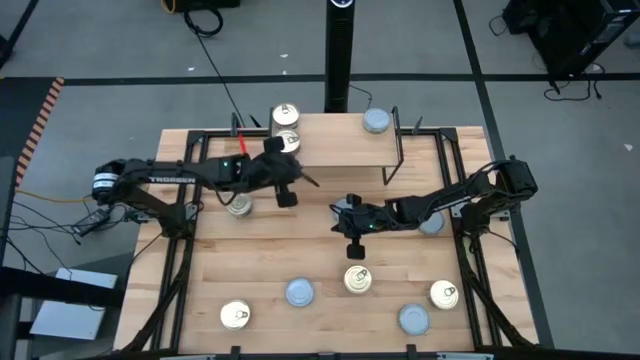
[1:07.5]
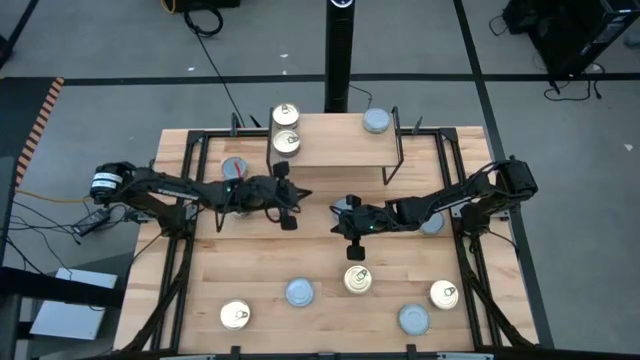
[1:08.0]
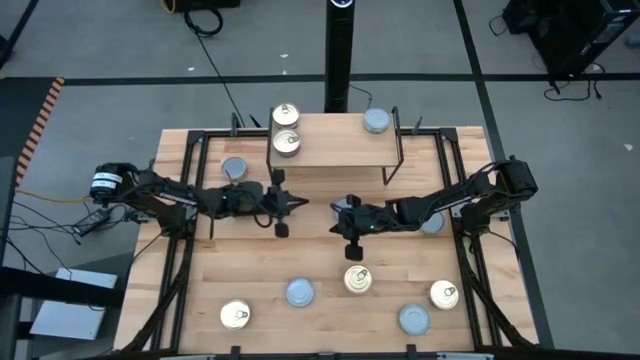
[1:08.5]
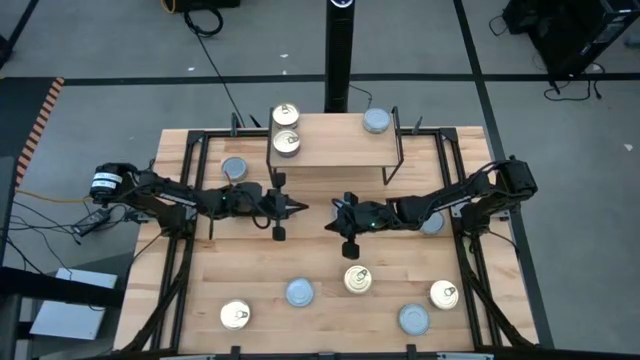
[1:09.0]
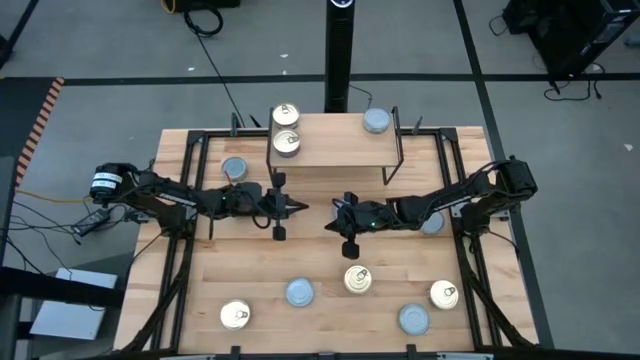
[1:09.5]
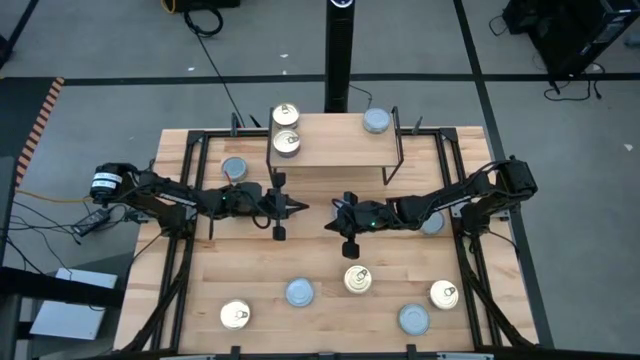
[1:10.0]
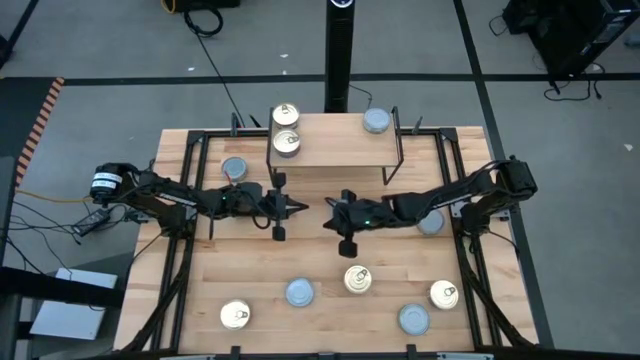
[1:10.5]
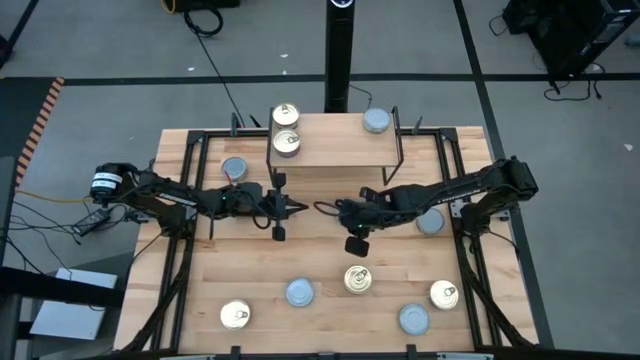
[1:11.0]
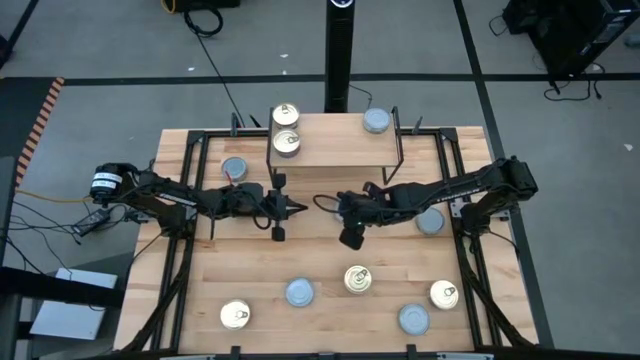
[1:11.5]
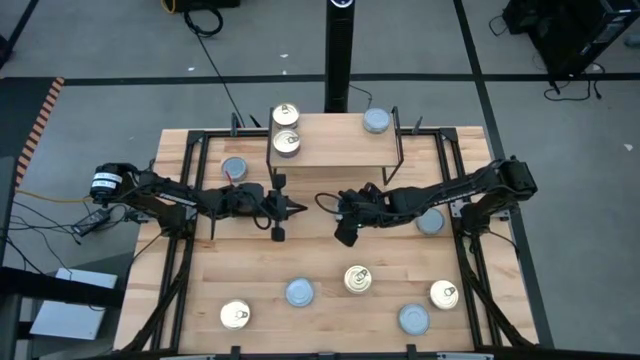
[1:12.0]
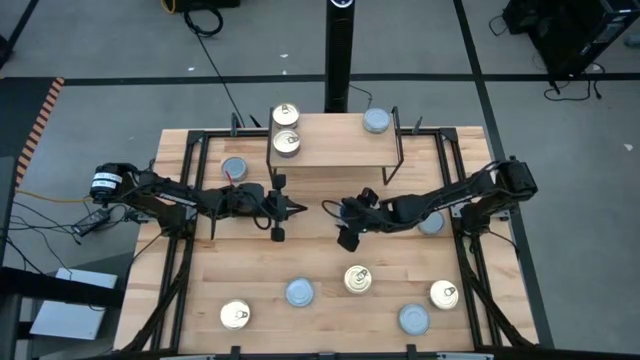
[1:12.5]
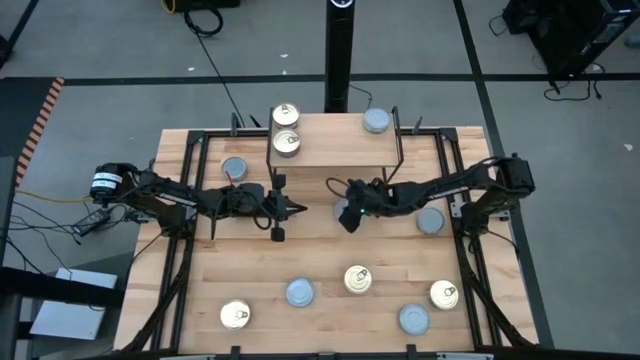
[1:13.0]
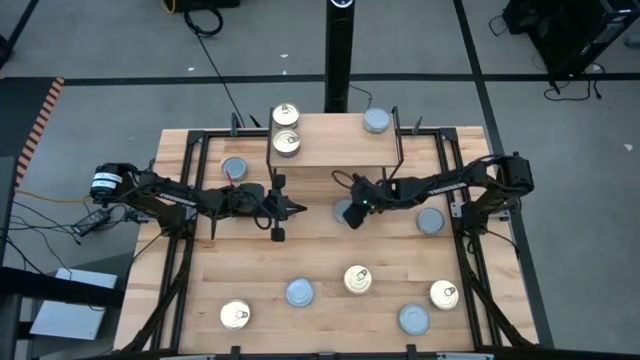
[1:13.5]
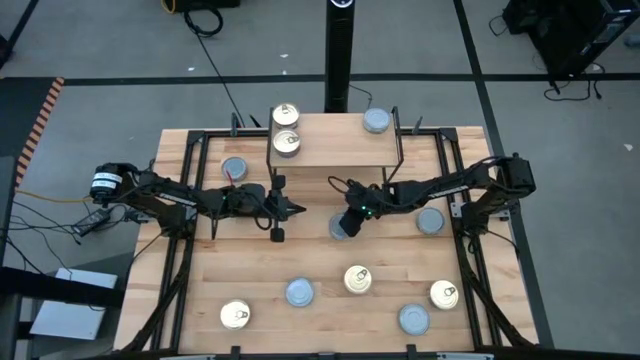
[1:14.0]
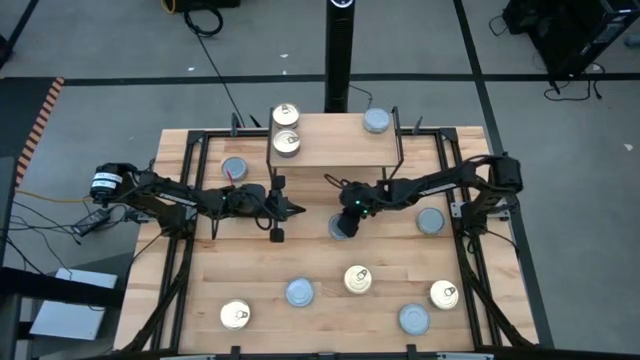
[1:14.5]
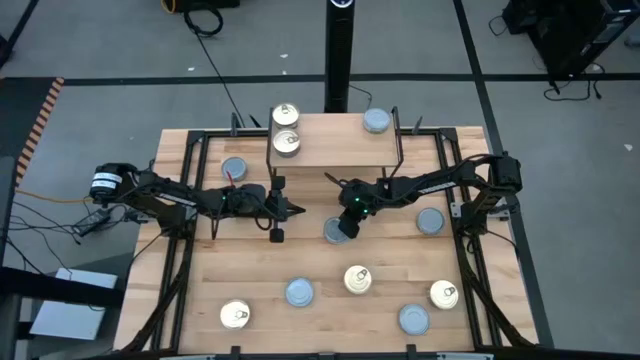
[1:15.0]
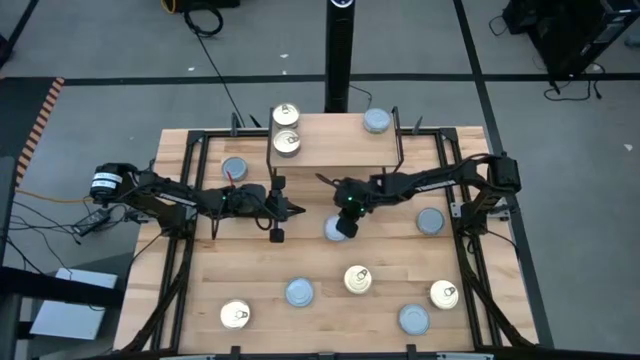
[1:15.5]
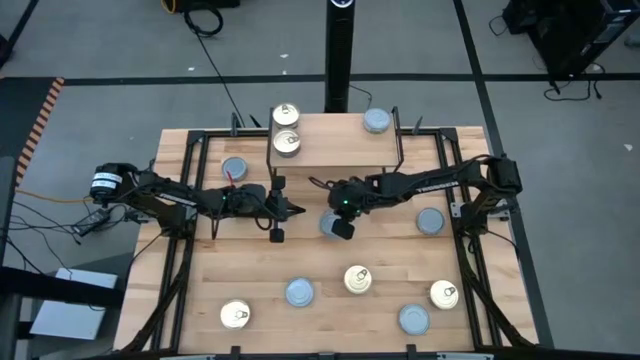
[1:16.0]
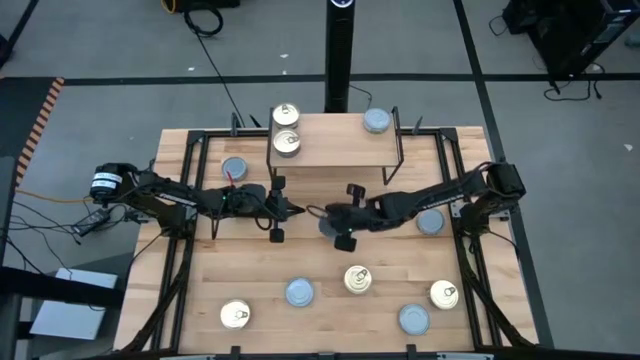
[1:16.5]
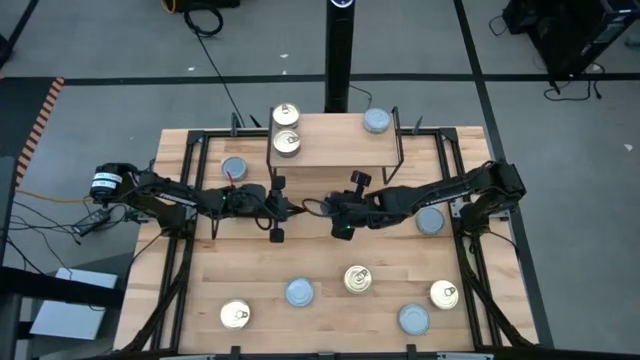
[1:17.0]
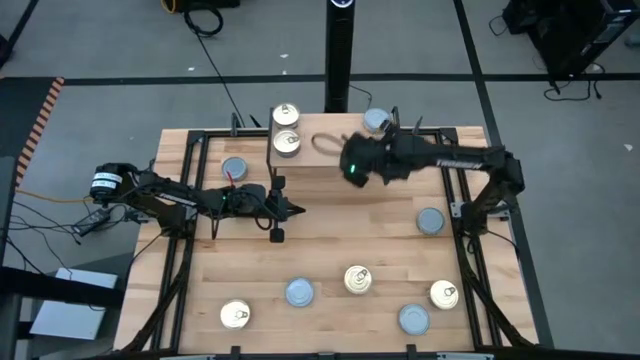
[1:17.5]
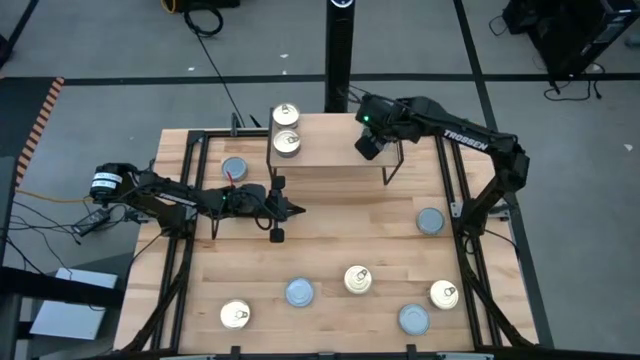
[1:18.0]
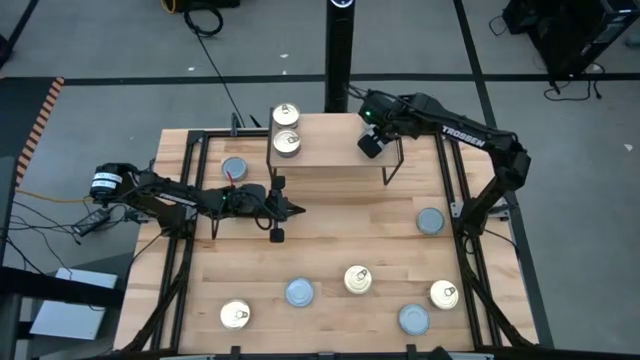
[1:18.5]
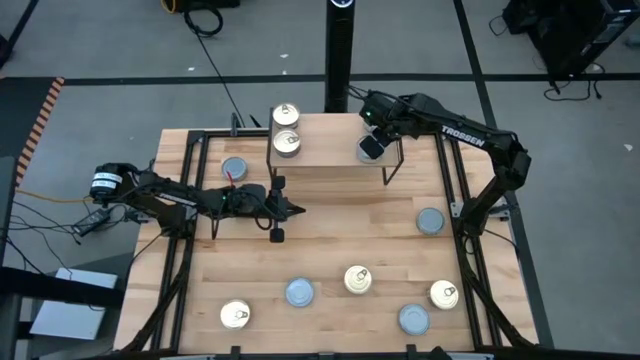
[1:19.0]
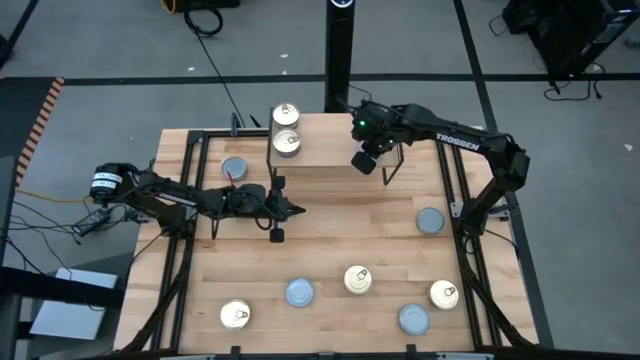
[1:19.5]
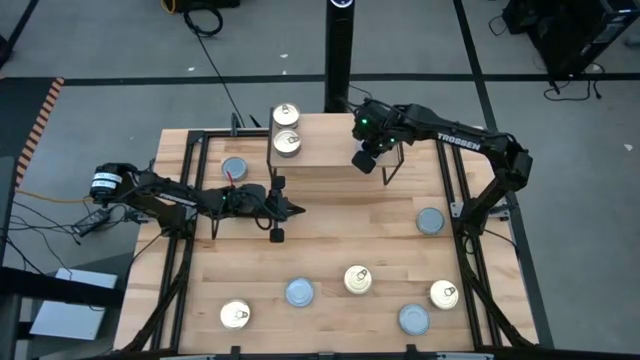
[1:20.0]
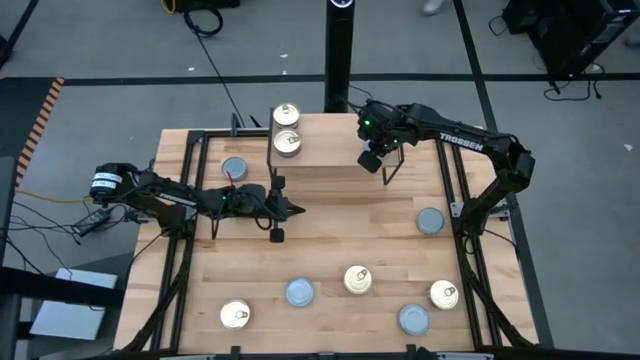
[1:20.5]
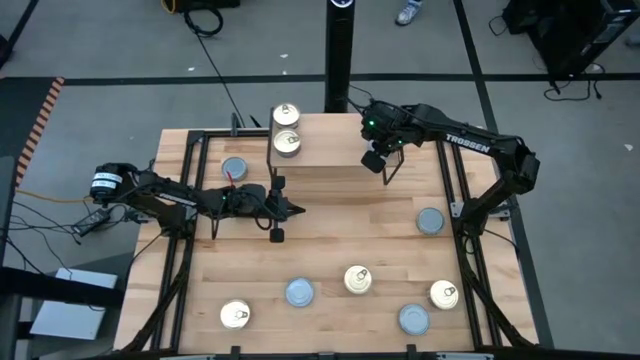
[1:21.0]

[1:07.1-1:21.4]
Task: Stack canned seafood by type on shelf
Put the green tuna can on the shelf

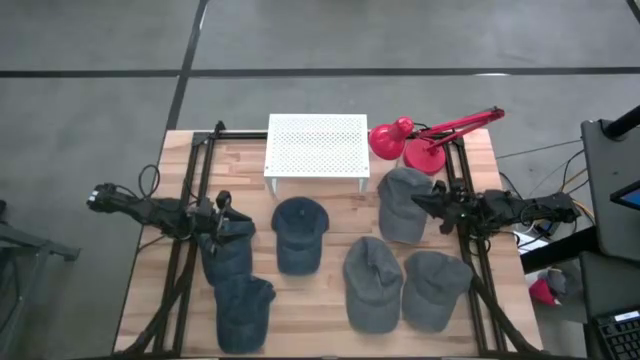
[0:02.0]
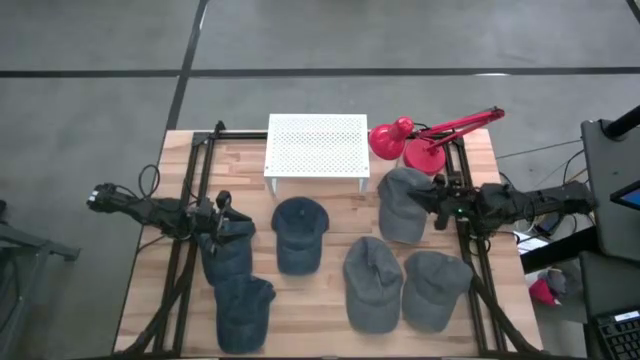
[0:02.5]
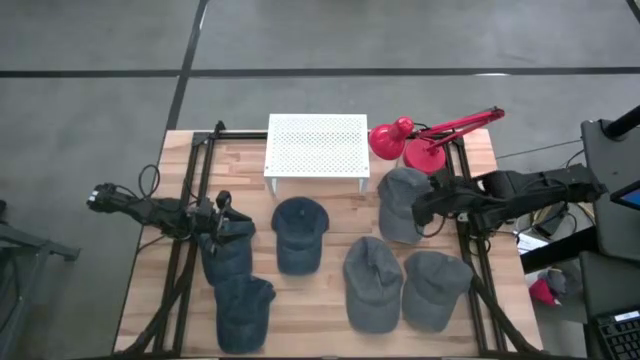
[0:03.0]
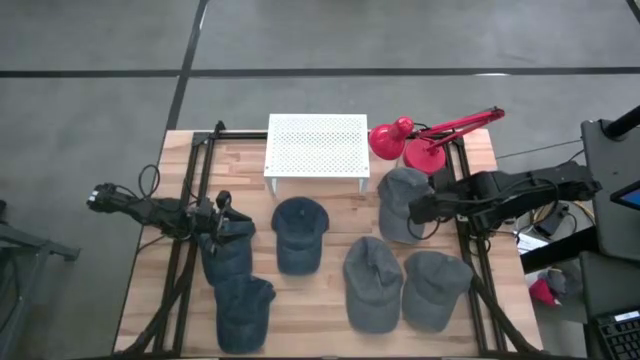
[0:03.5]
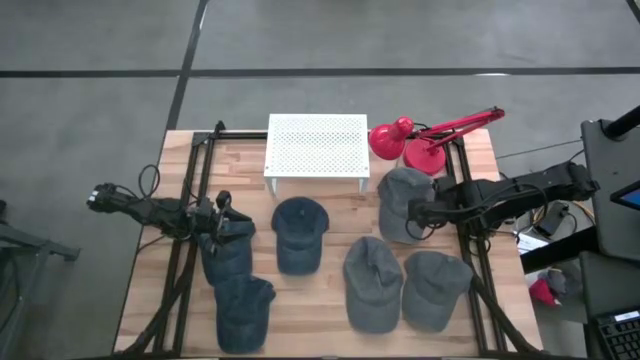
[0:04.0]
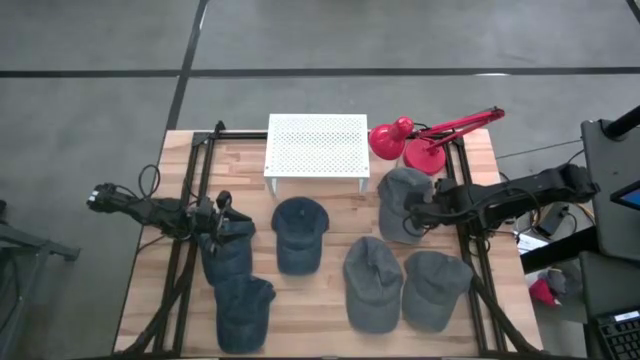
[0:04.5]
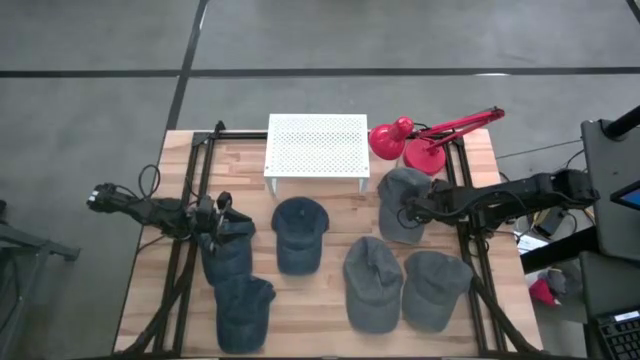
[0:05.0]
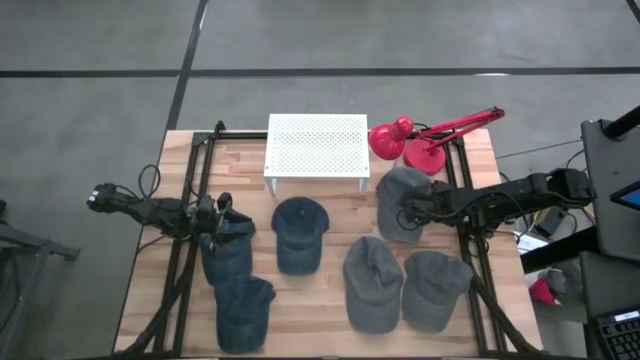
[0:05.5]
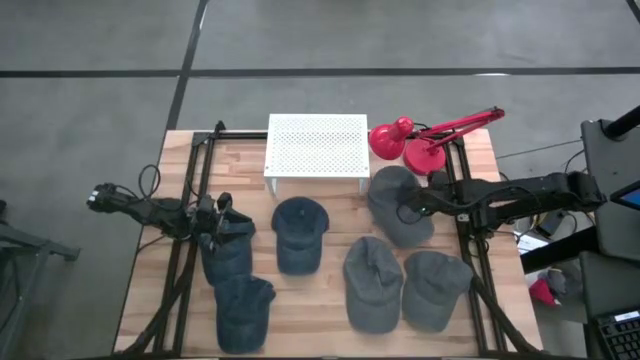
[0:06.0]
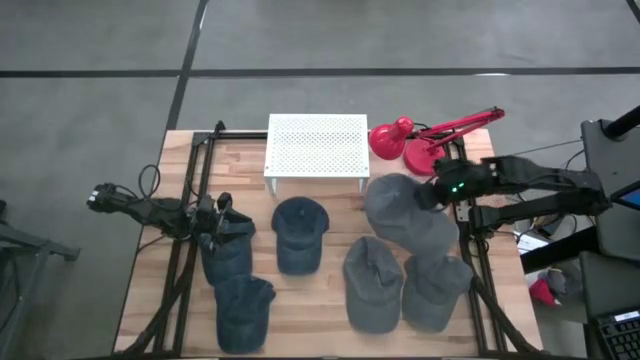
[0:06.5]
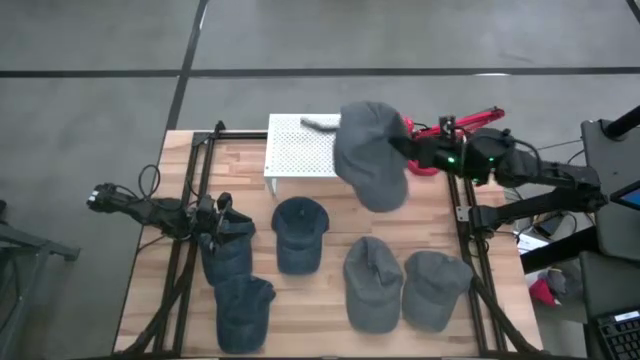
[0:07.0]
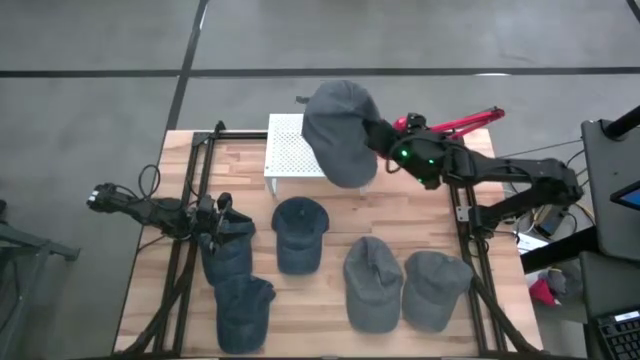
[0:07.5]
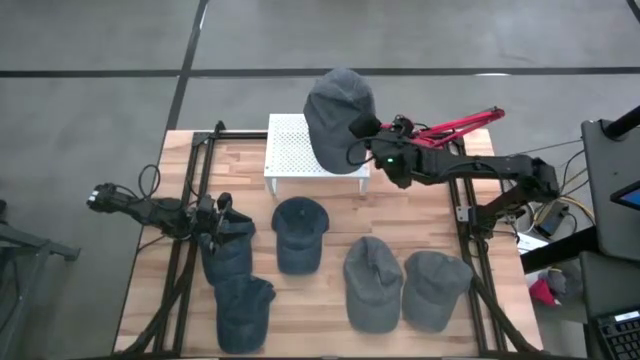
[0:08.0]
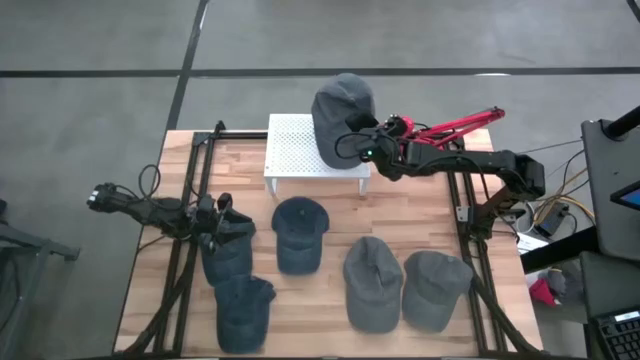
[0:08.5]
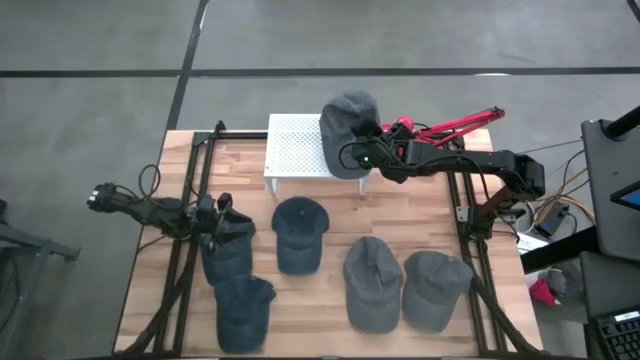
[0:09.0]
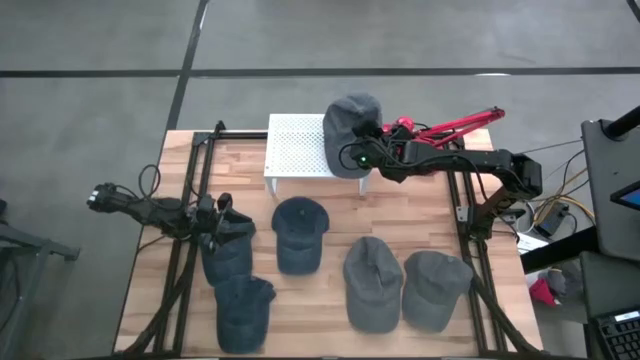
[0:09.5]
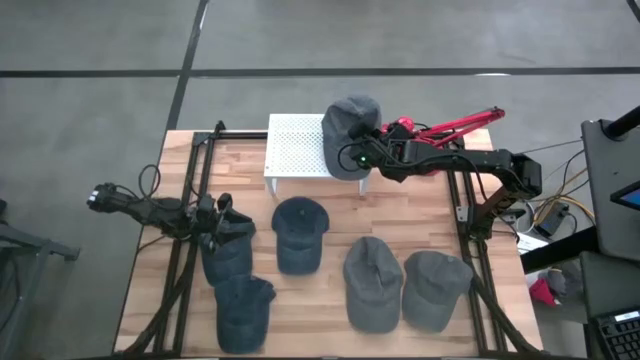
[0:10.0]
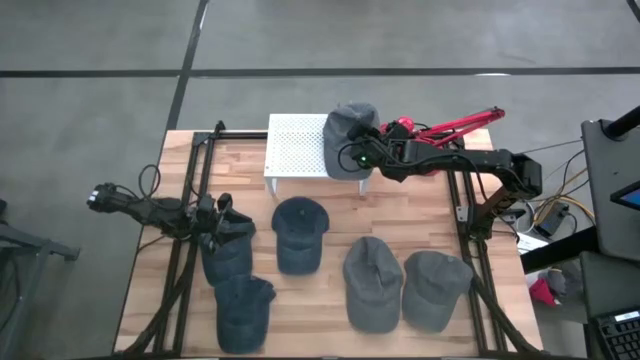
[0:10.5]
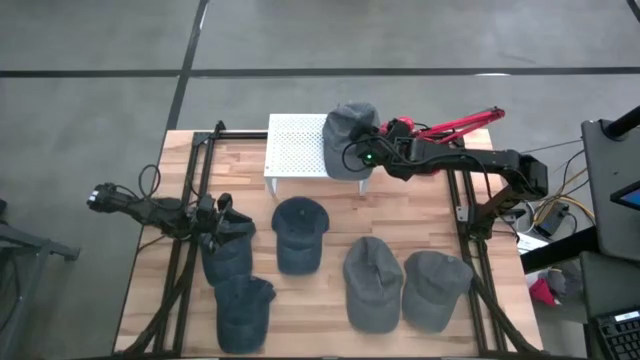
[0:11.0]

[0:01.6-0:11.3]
Task: Pick & Place hat
Put the top gray cap on the shelf
